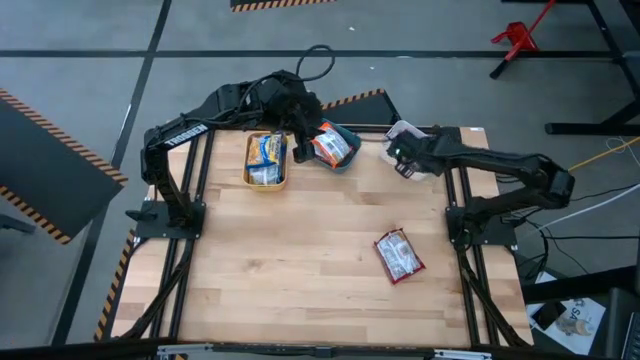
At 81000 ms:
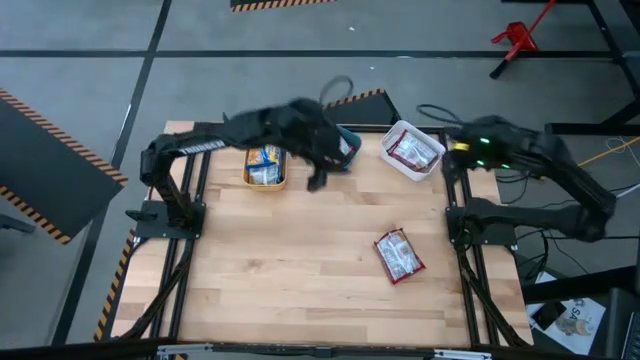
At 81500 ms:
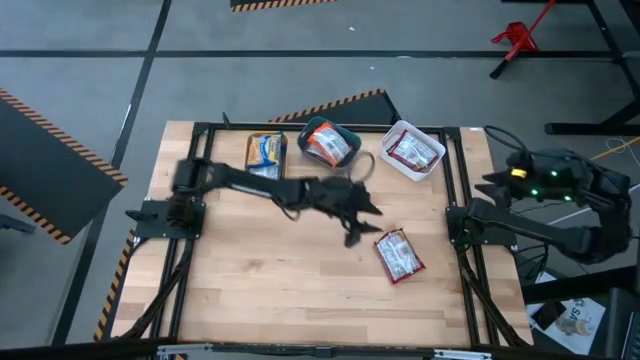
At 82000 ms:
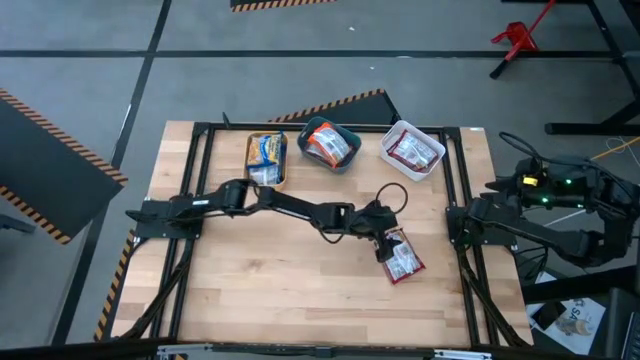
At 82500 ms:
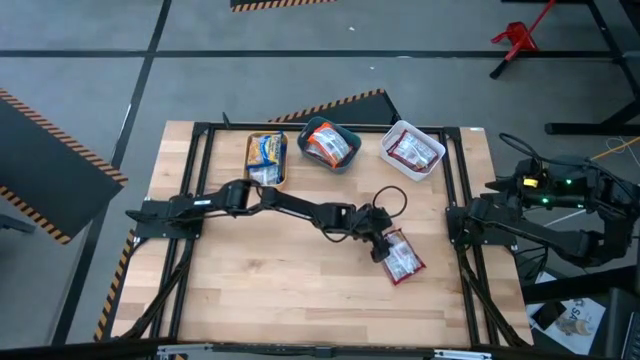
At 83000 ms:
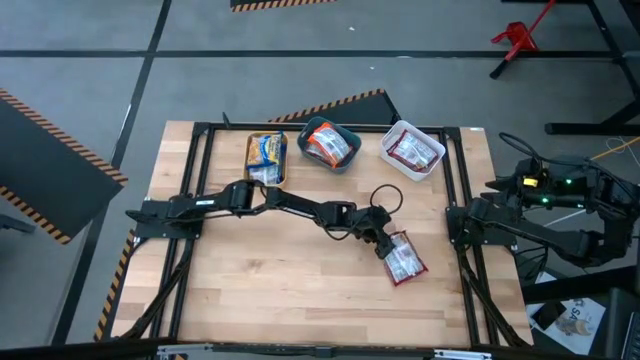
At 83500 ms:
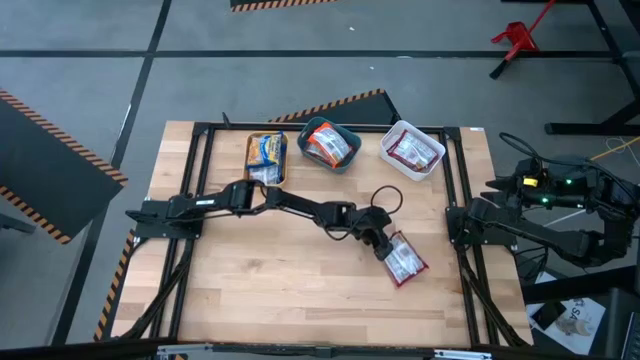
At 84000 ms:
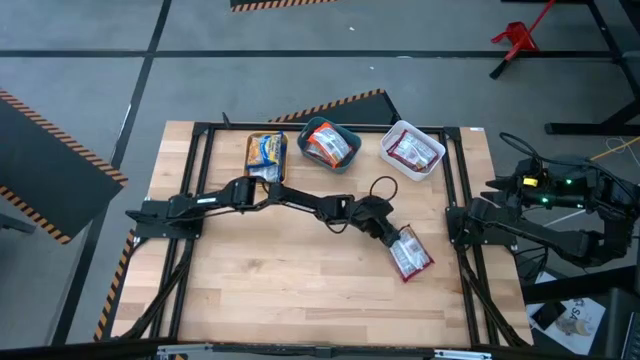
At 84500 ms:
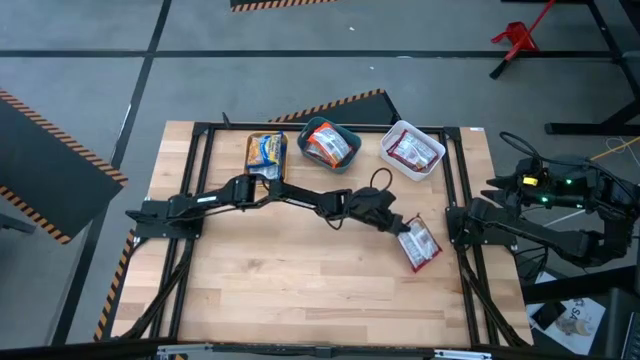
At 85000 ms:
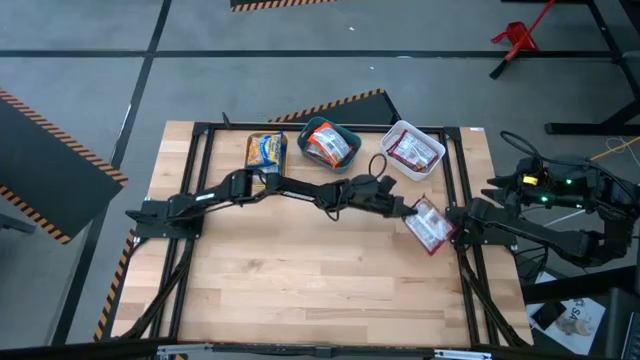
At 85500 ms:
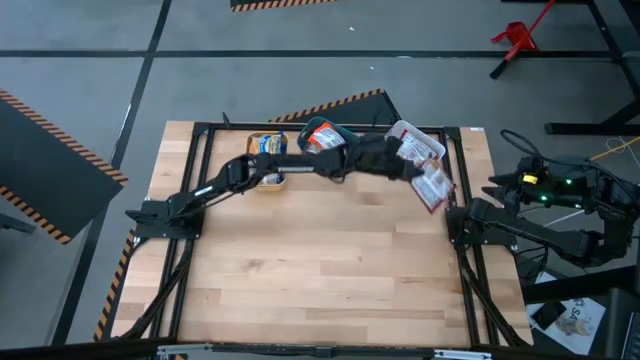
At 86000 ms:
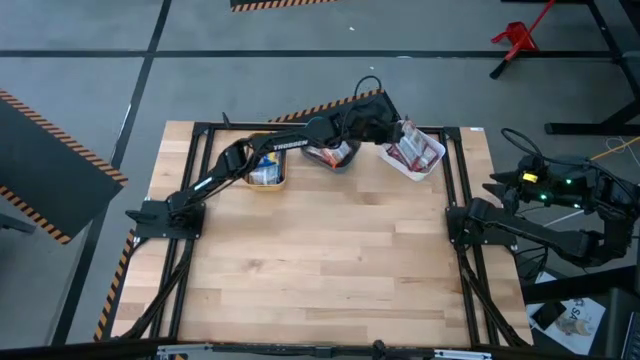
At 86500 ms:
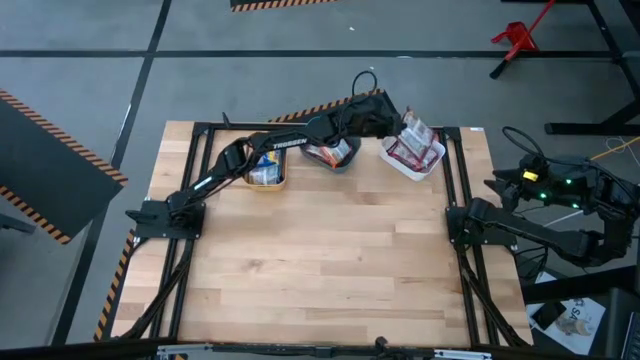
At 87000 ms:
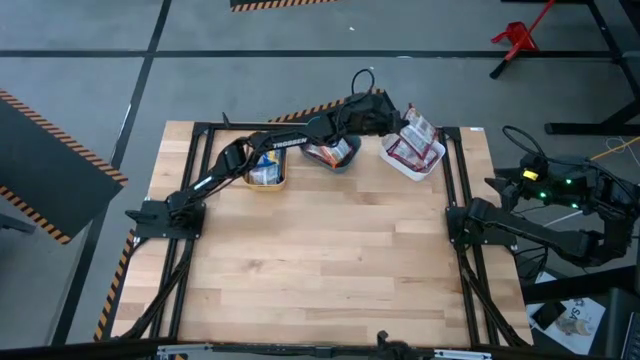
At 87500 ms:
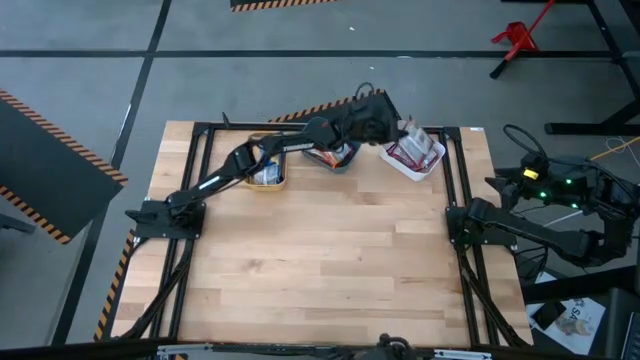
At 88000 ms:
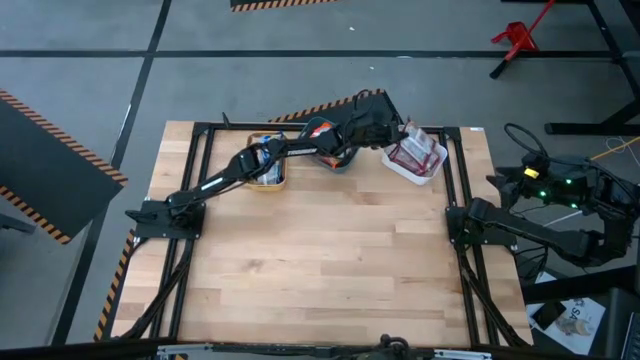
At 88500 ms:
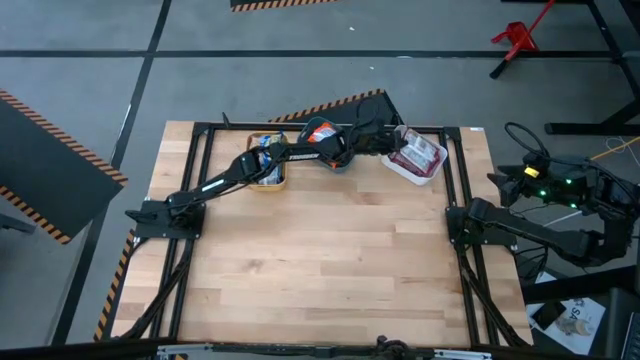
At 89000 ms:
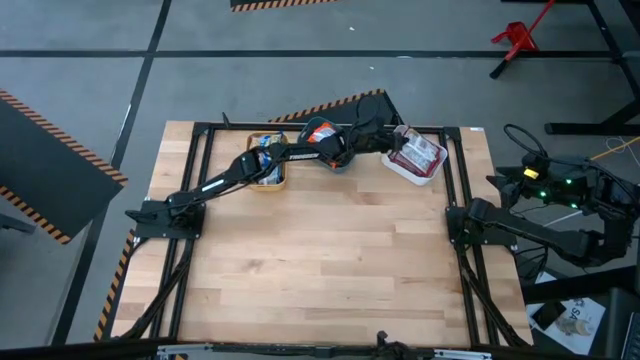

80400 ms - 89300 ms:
Task: Sort Maruchan noodles
Put the red noodle pack into the white bin

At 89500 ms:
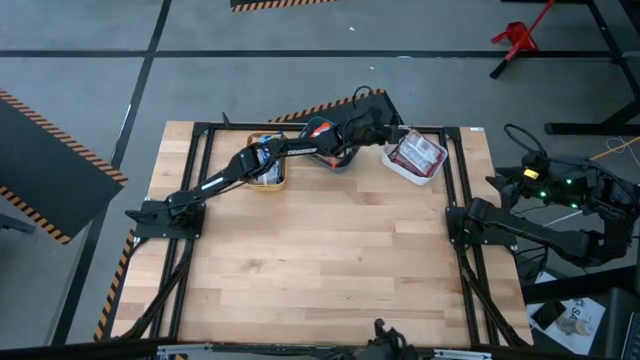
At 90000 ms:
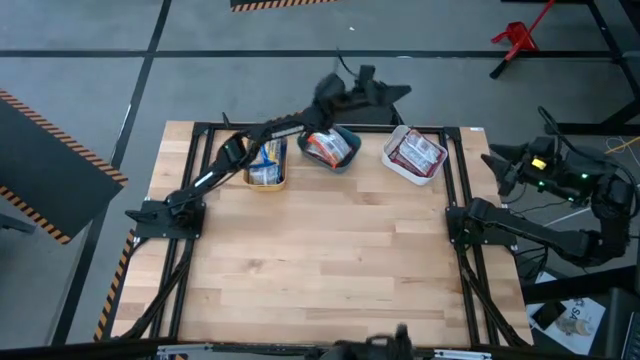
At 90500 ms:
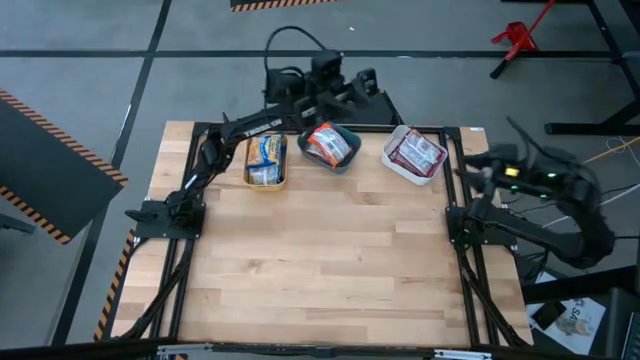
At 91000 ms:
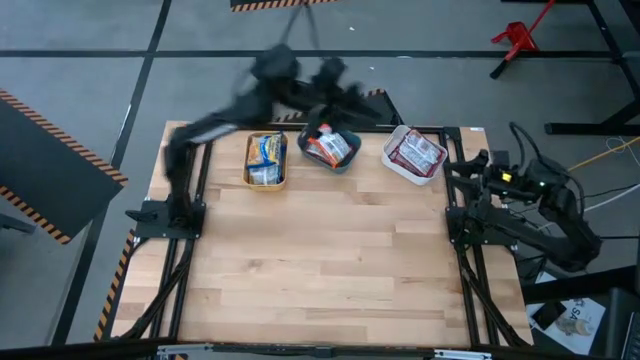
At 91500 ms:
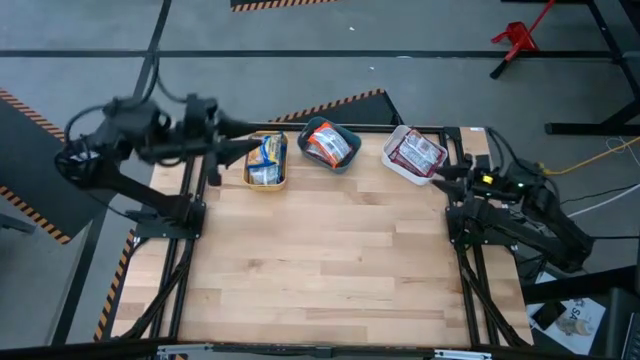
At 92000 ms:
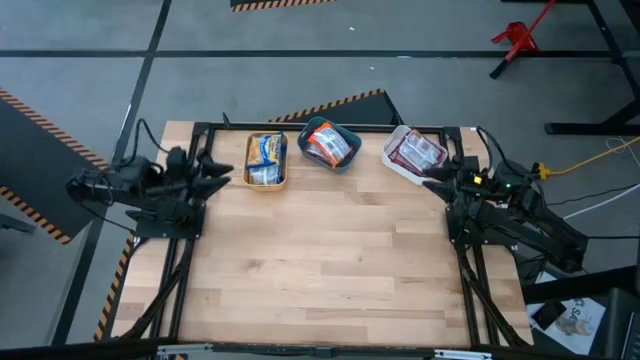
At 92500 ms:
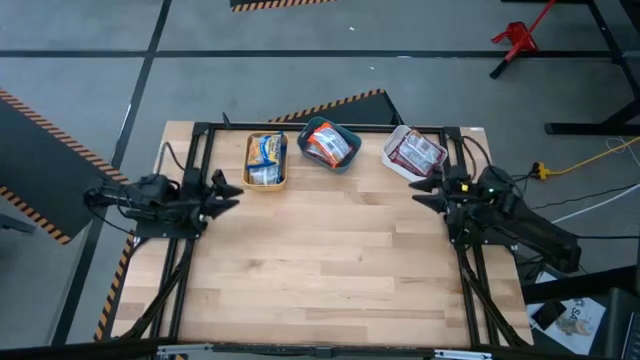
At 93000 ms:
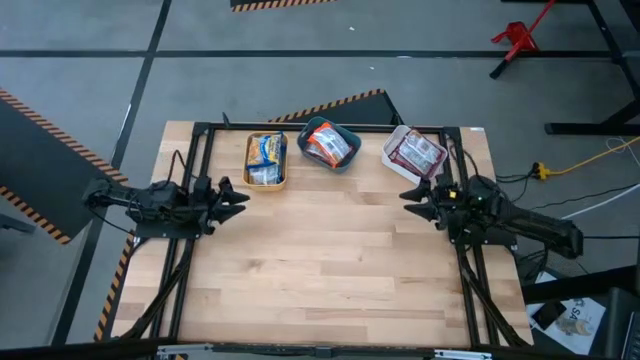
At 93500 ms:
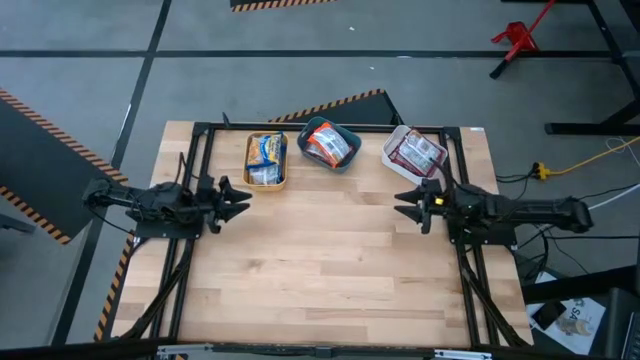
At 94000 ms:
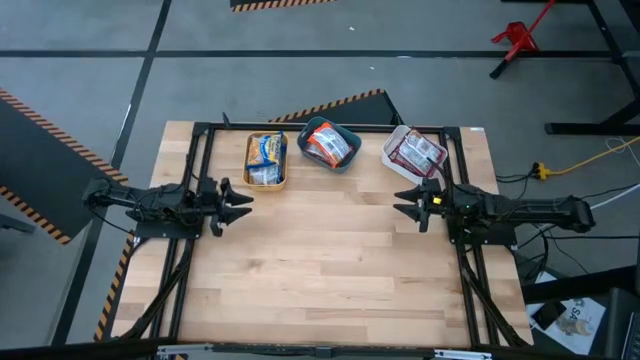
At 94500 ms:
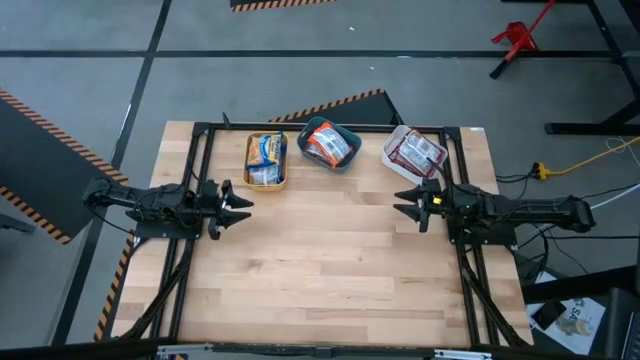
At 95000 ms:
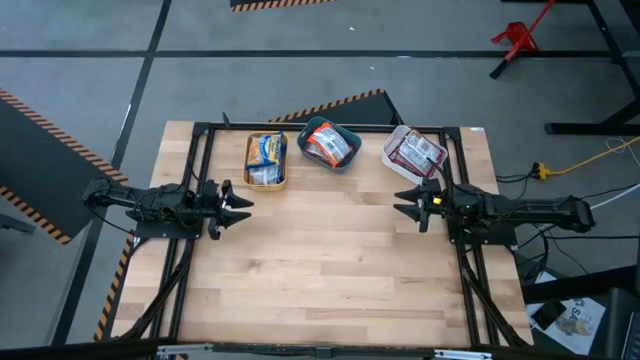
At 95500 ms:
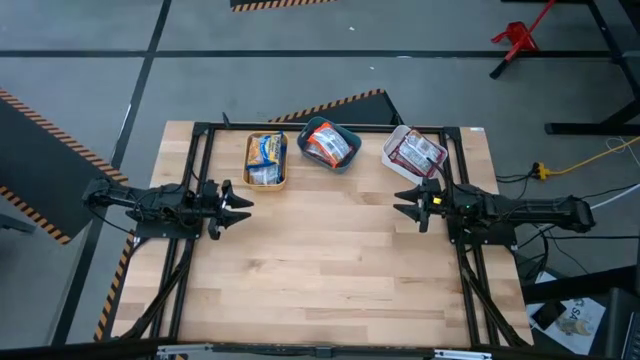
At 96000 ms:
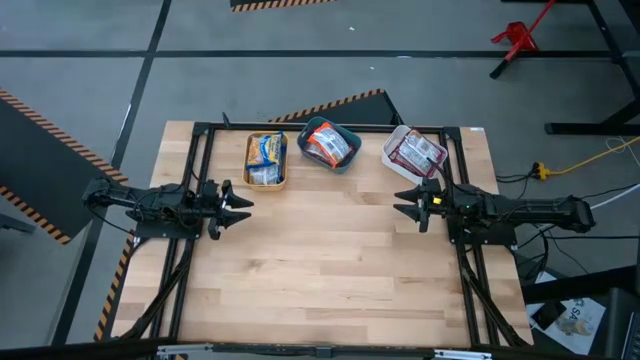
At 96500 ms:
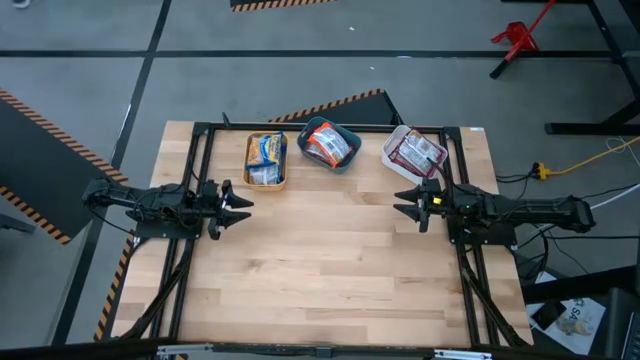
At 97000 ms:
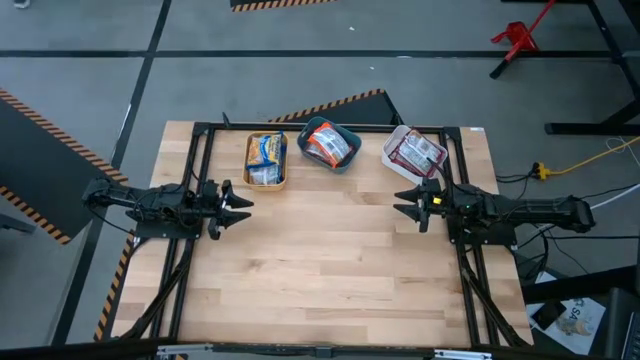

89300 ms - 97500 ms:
Return to Home Position

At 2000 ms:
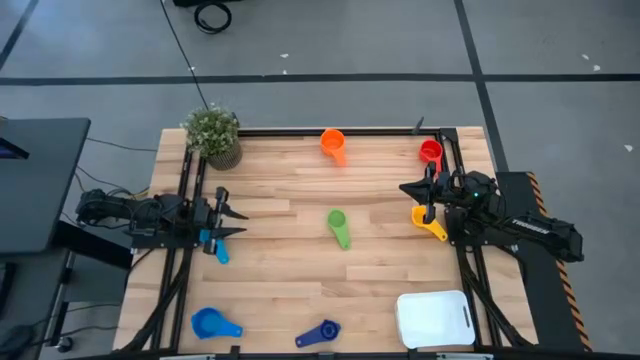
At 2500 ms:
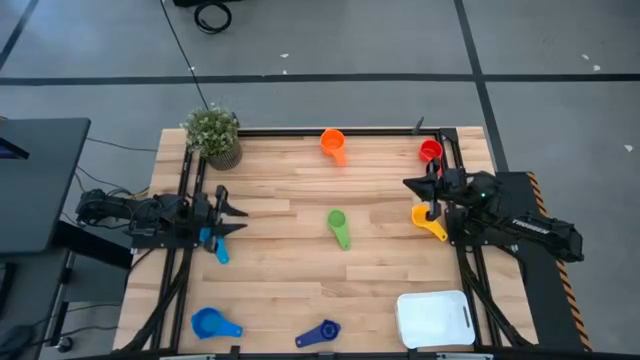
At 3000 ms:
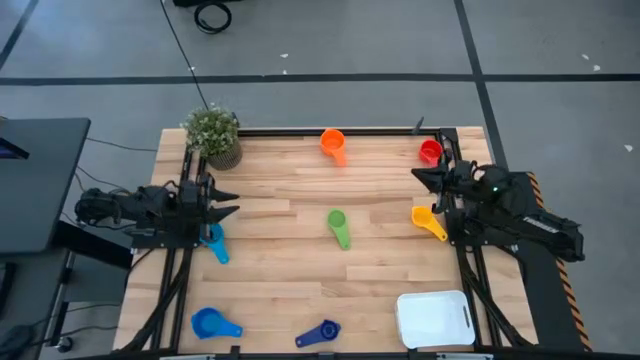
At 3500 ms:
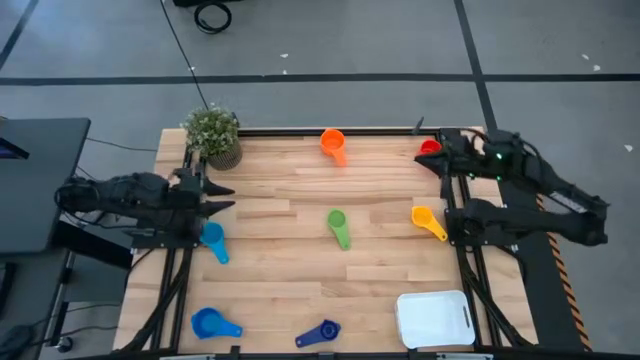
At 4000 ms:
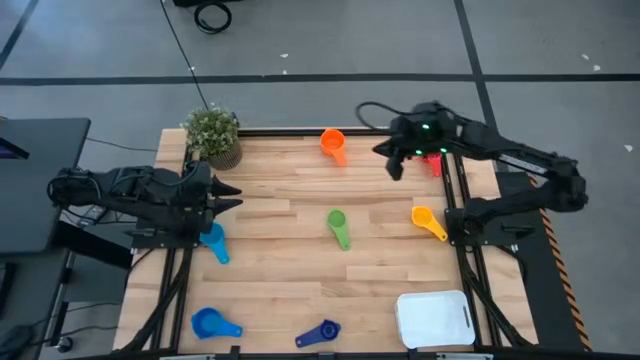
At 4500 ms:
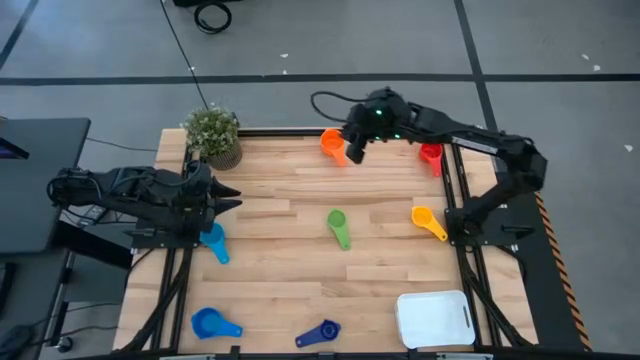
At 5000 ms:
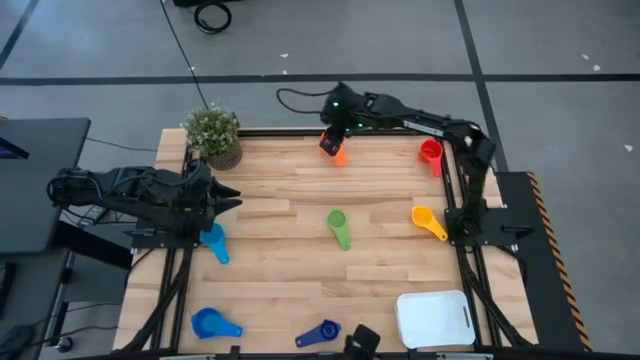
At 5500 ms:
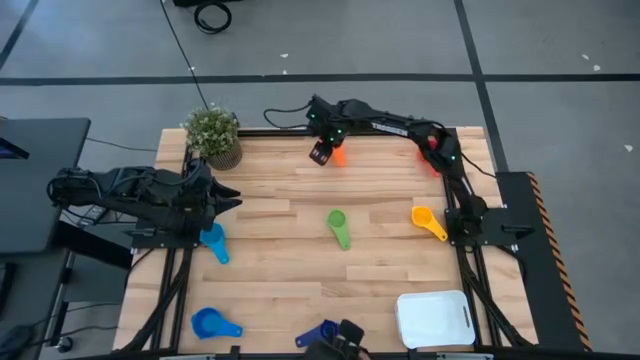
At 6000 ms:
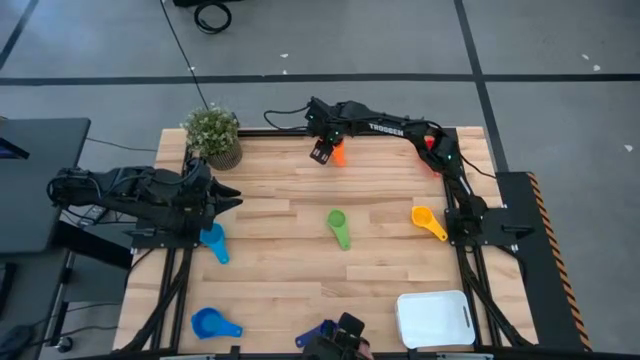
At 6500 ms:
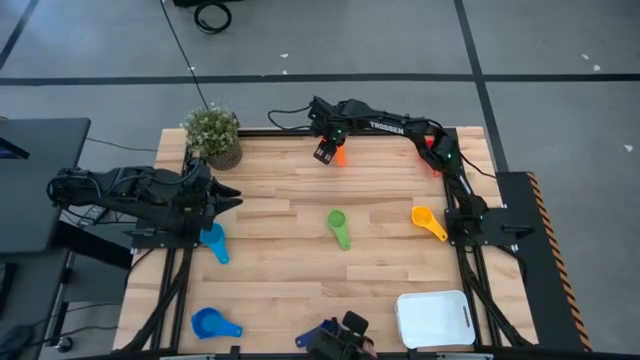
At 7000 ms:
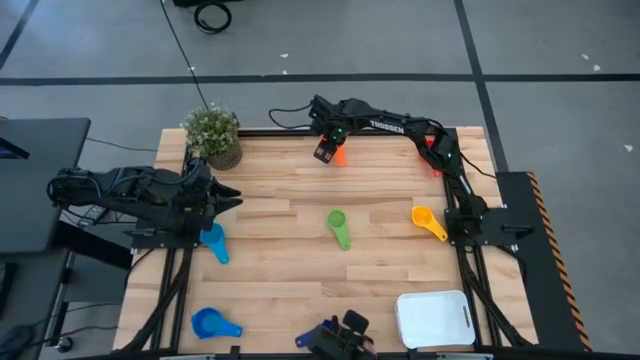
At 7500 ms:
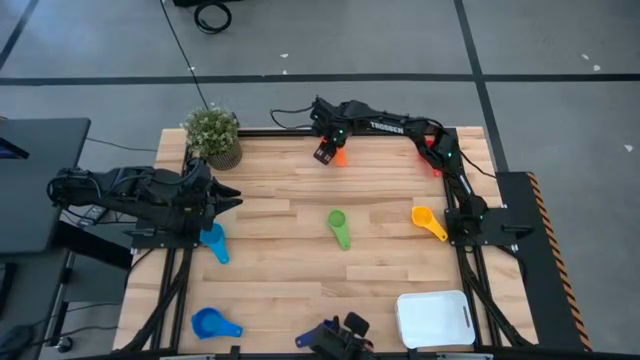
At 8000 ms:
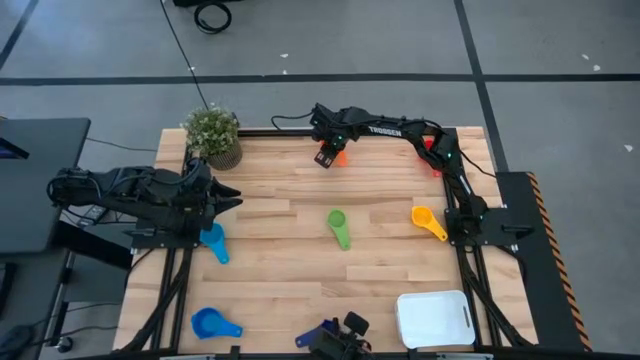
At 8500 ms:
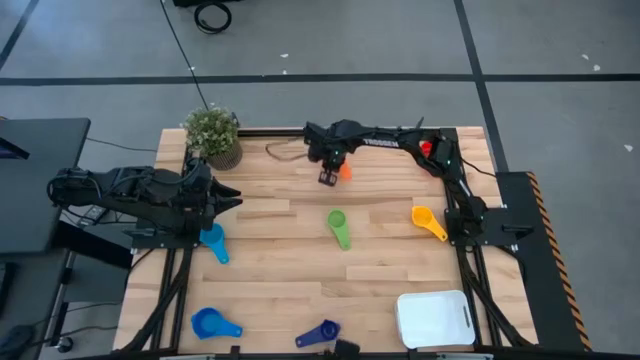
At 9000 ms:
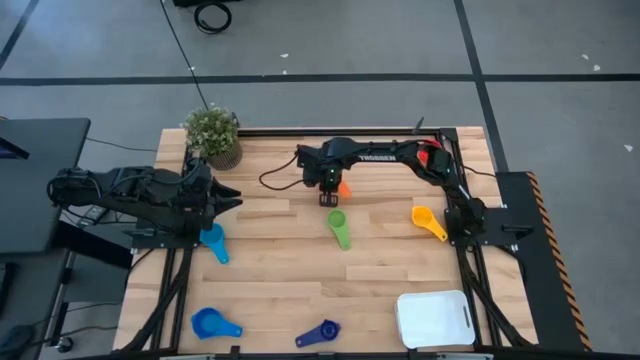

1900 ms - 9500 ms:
Task: Nest measuring cups in basket
Move the orange measuring cup
